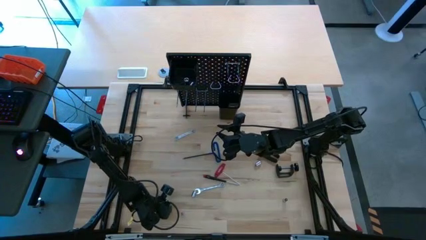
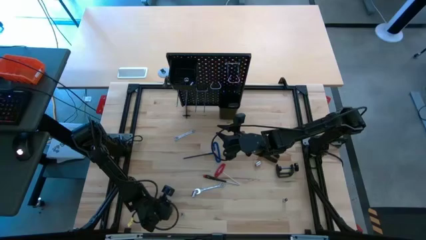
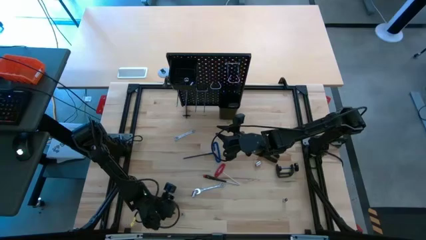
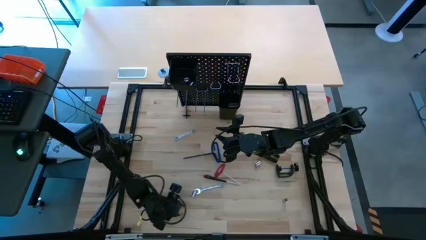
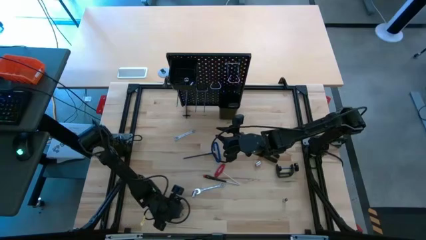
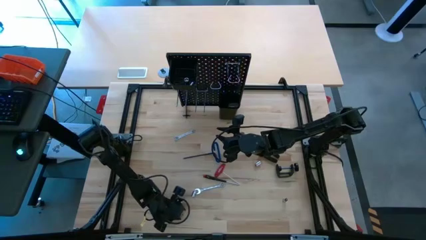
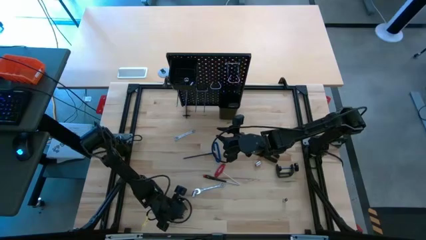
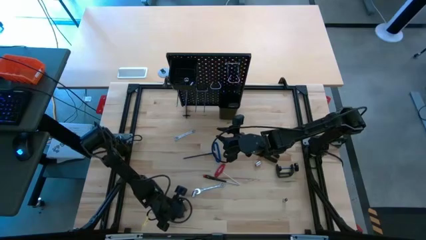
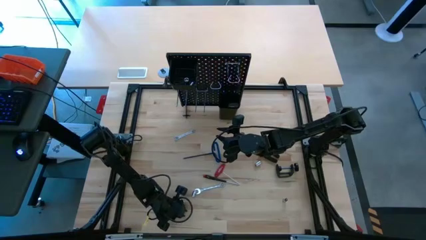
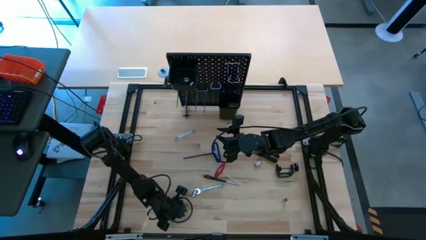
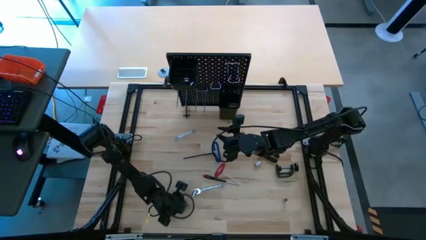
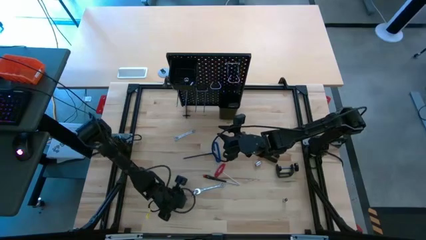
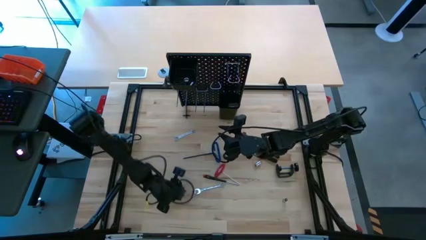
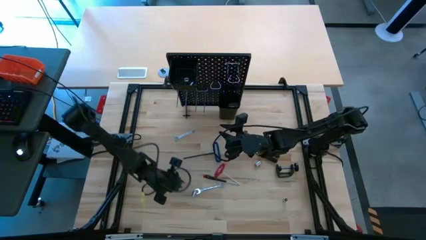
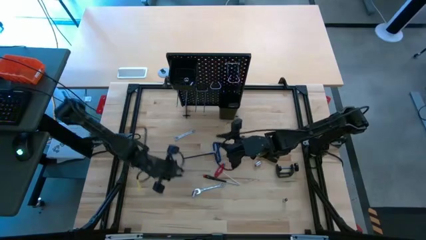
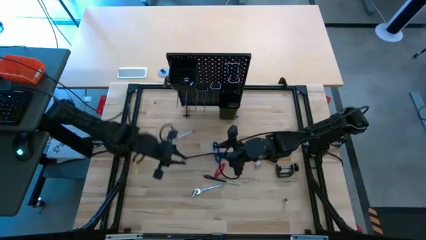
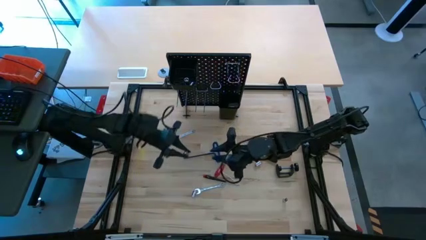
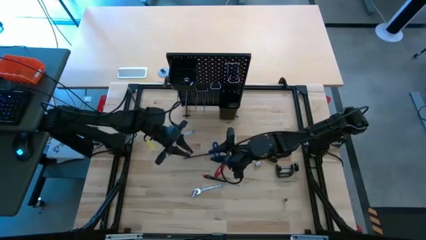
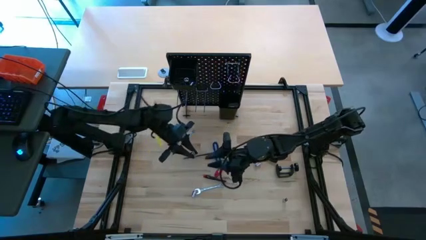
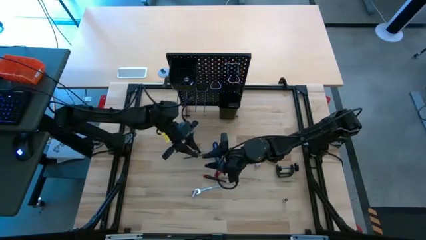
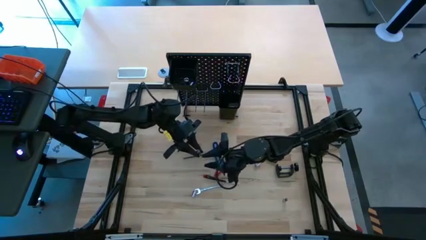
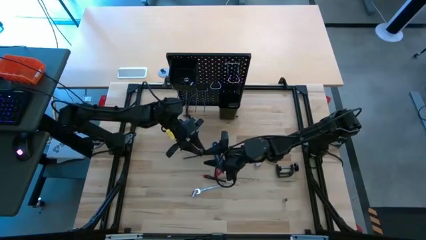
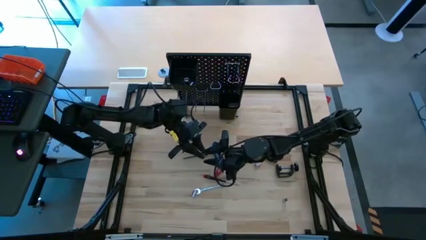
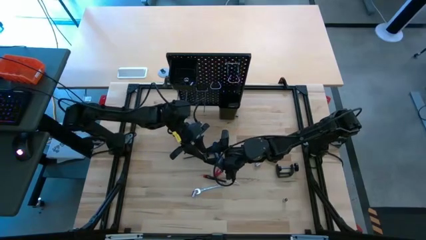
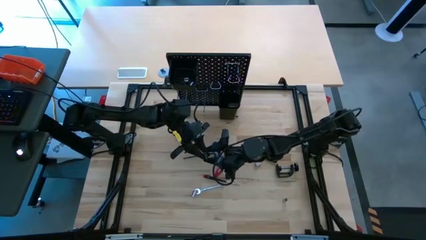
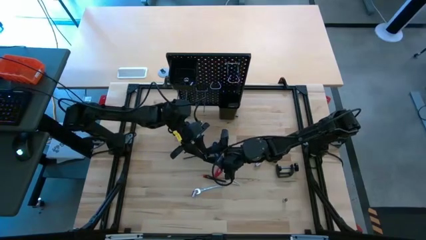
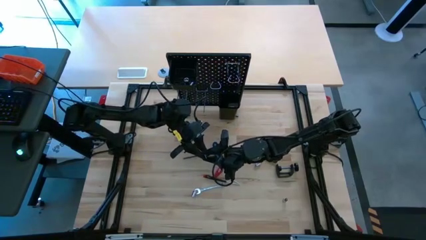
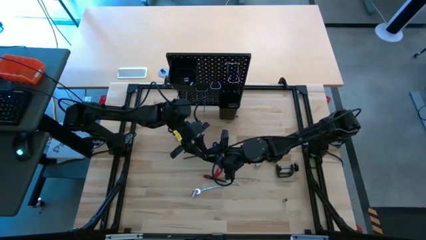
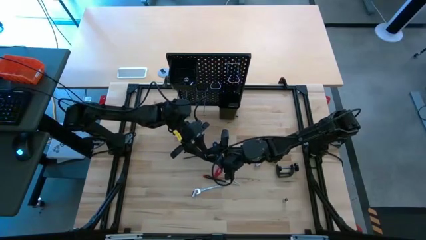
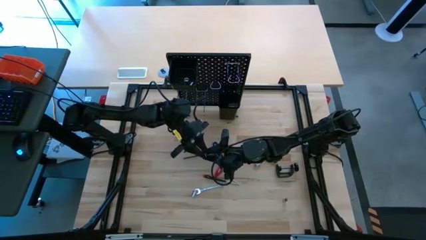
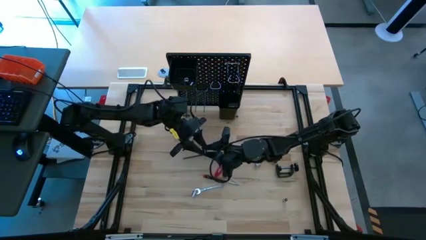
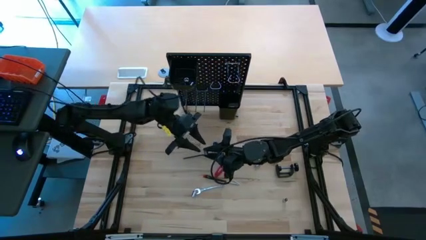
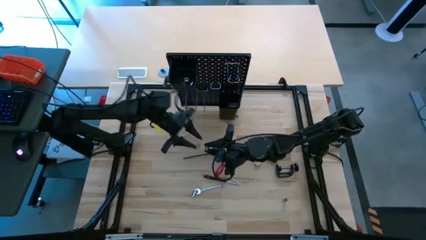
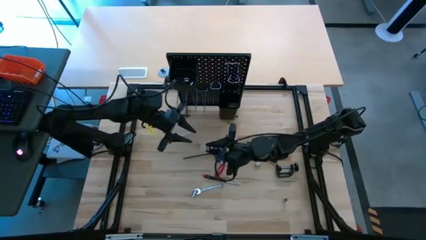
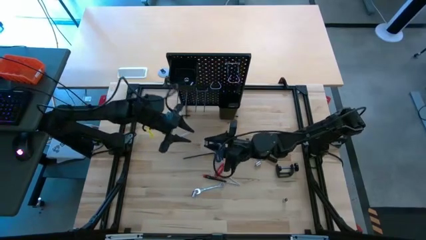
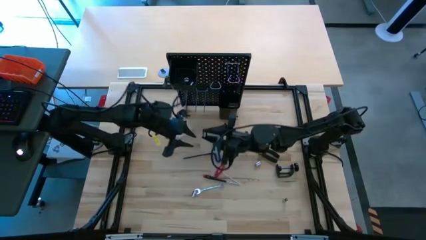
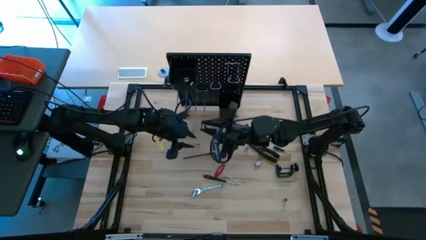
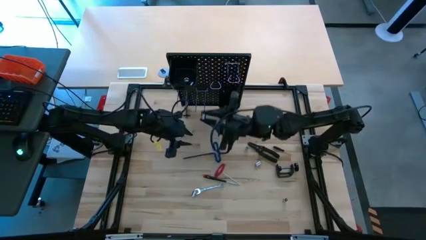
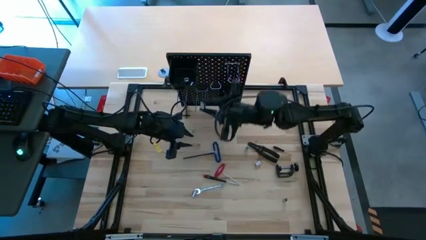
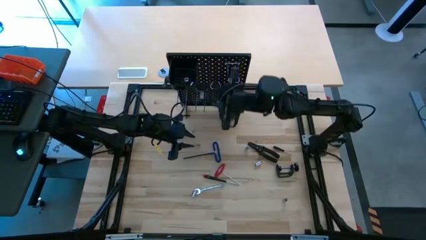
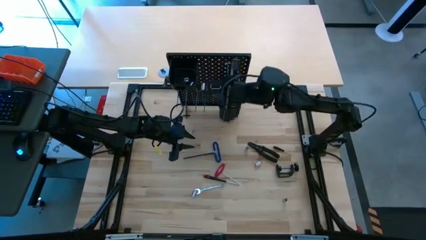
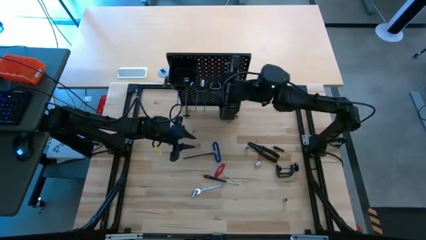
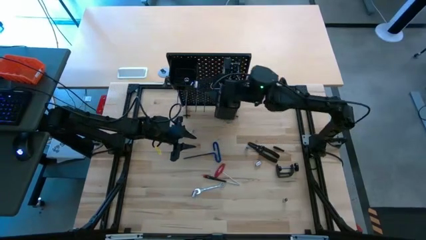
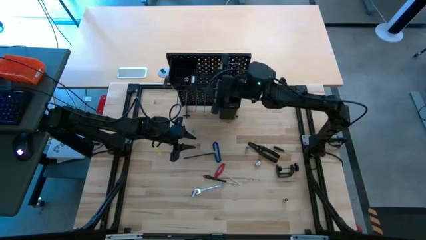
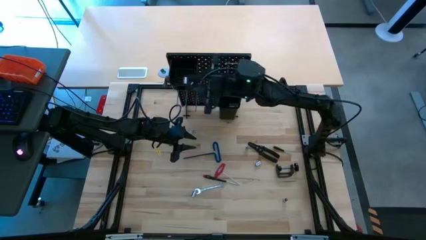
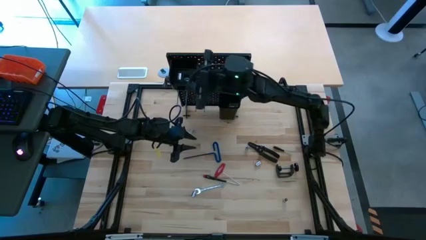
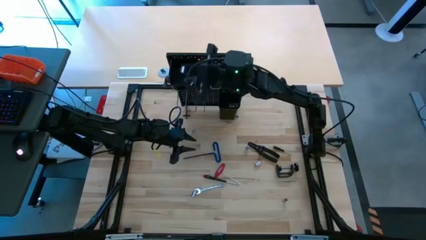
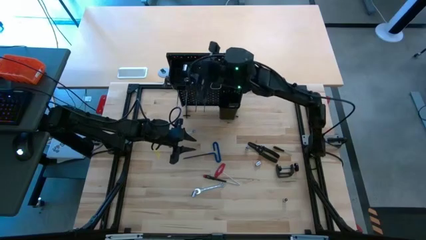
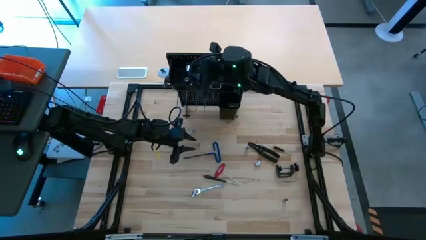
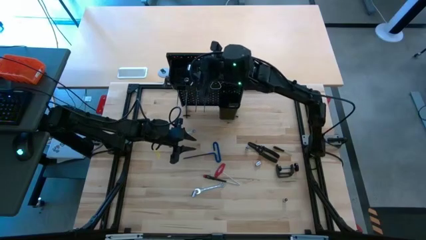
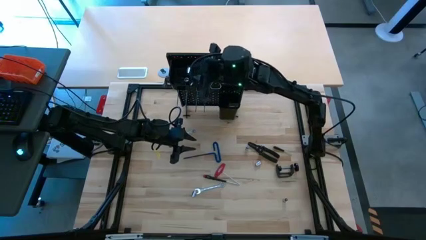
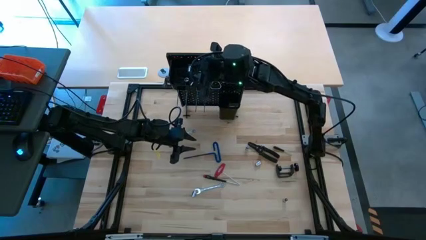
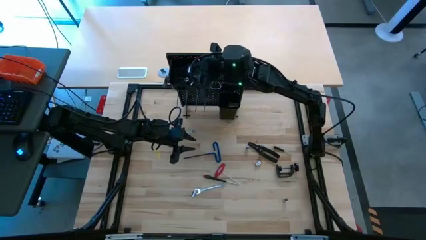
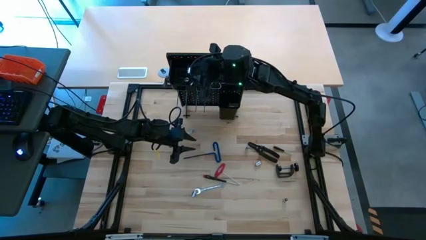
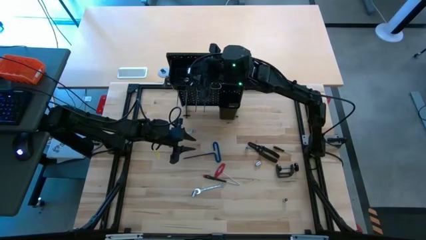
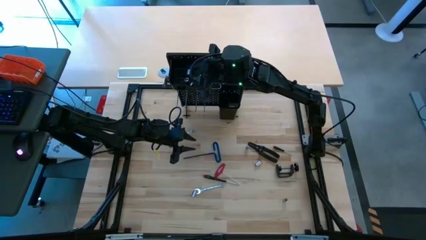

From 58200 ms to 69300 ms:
Task: Hang tools onto peg board
Put the socket into the top black bin on the pegboard
